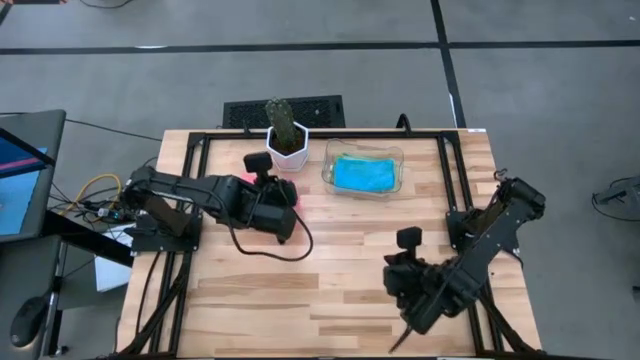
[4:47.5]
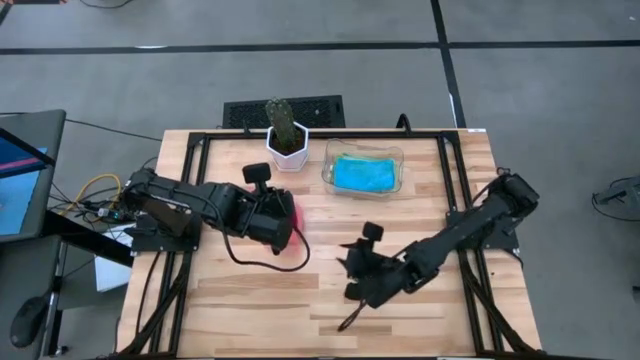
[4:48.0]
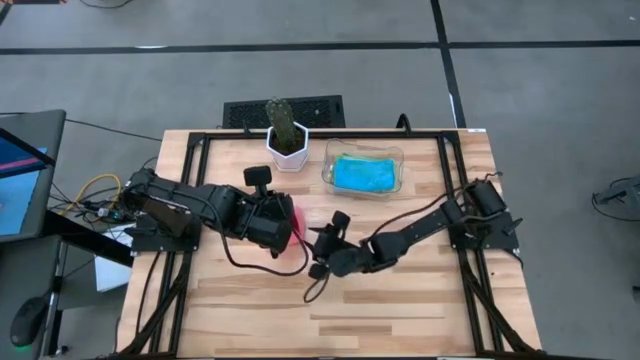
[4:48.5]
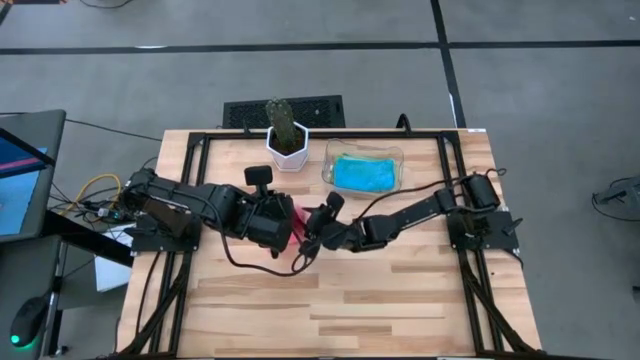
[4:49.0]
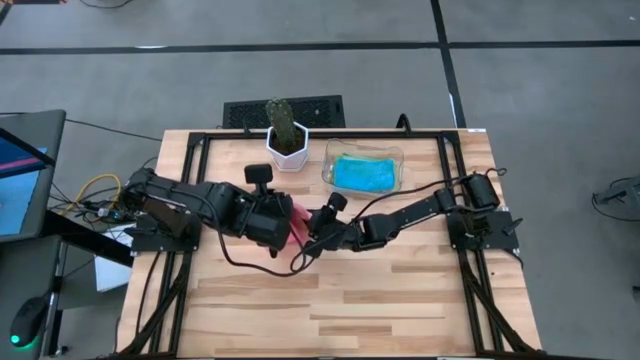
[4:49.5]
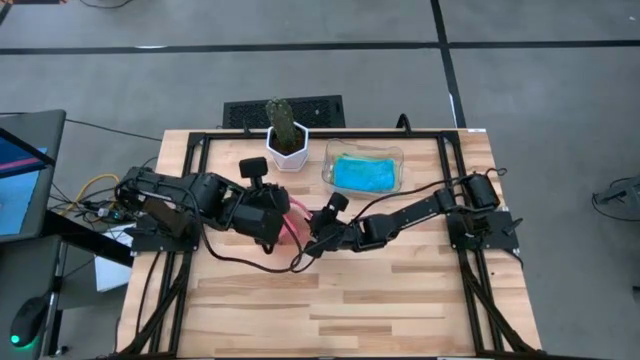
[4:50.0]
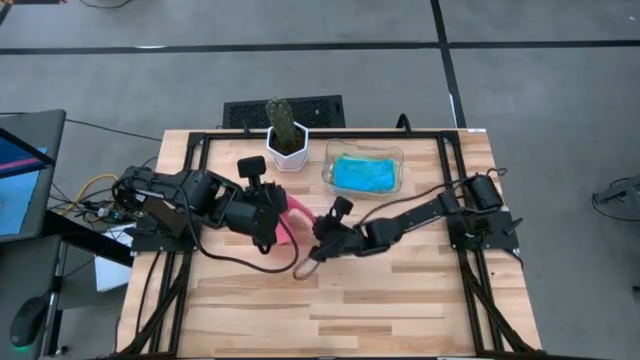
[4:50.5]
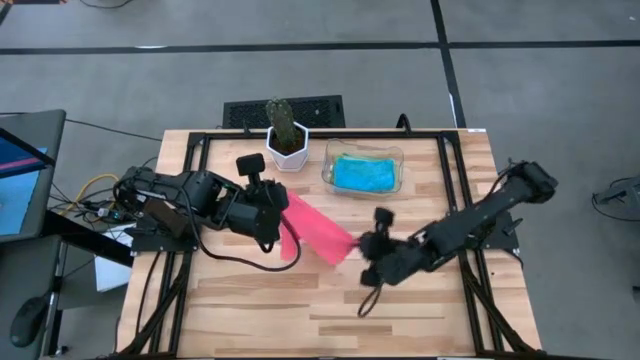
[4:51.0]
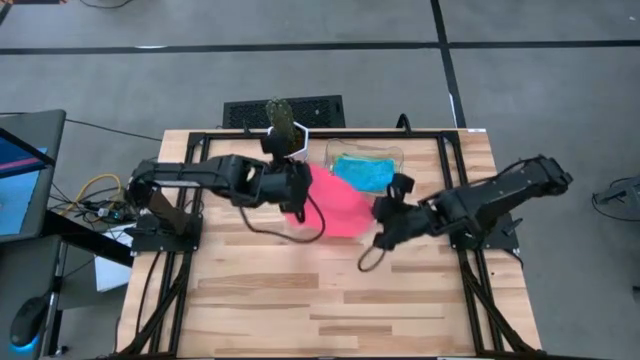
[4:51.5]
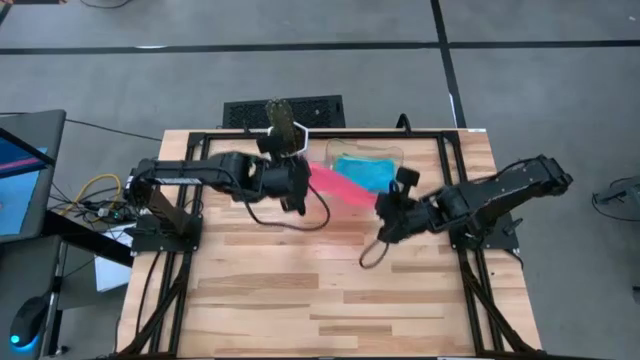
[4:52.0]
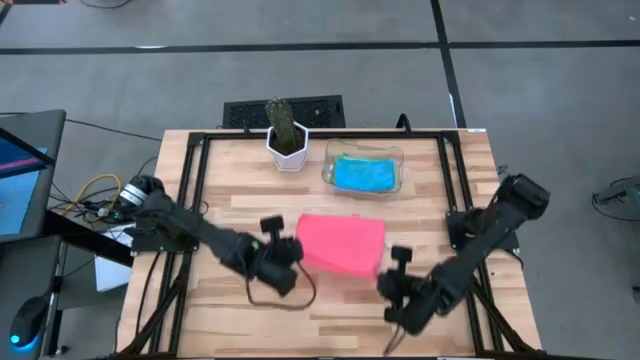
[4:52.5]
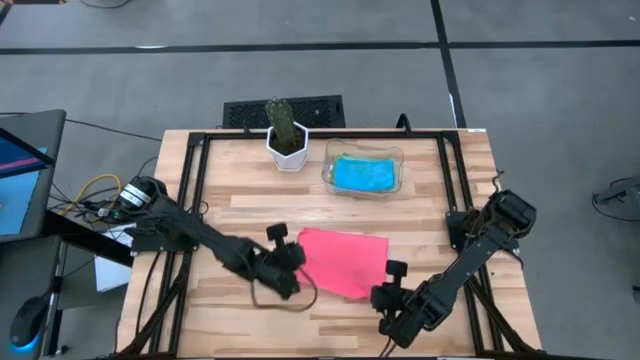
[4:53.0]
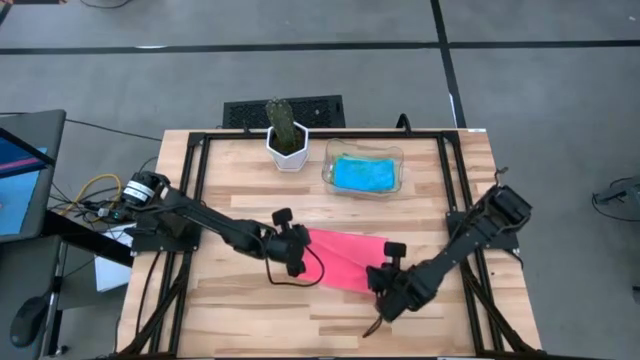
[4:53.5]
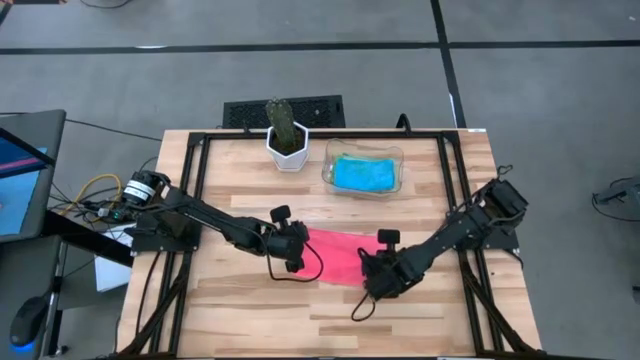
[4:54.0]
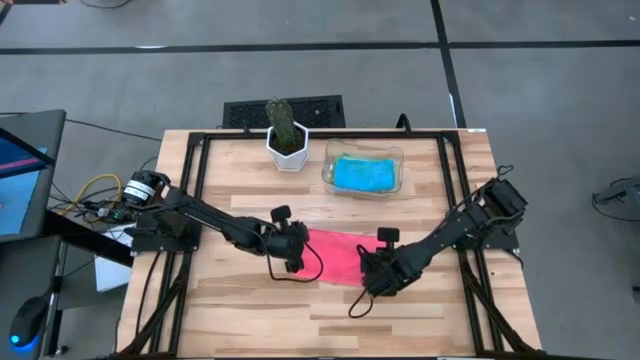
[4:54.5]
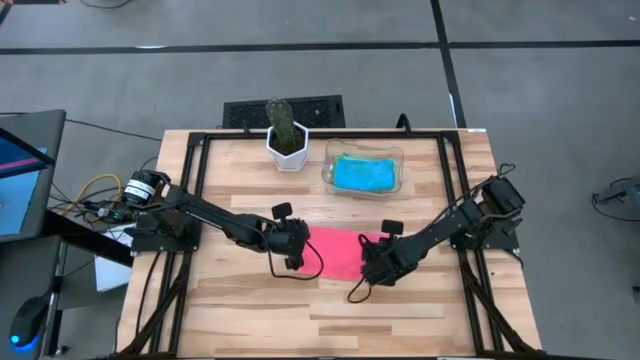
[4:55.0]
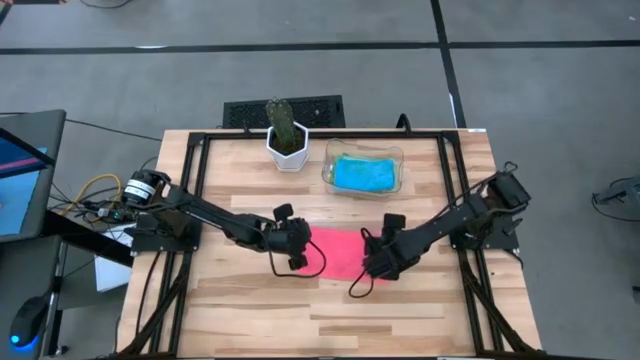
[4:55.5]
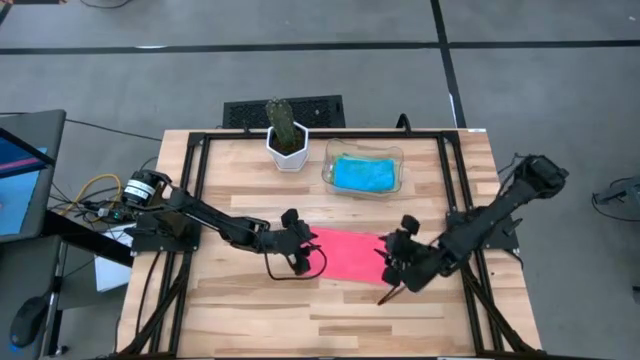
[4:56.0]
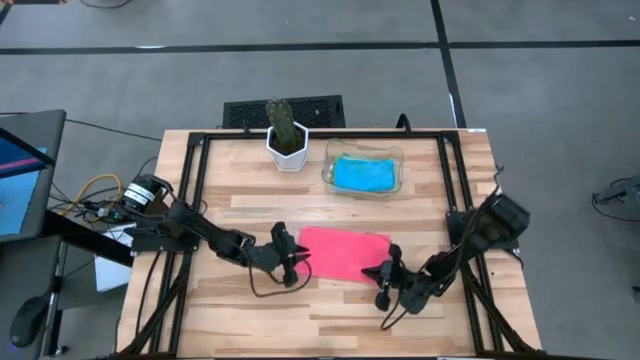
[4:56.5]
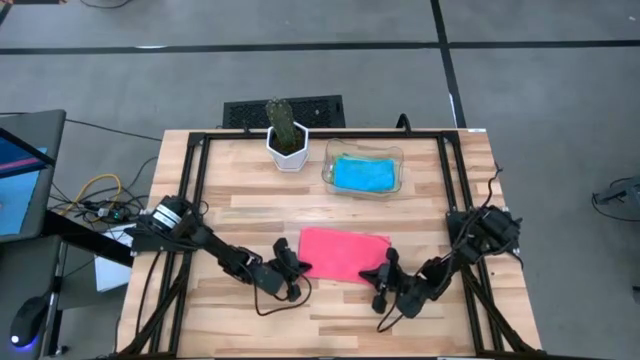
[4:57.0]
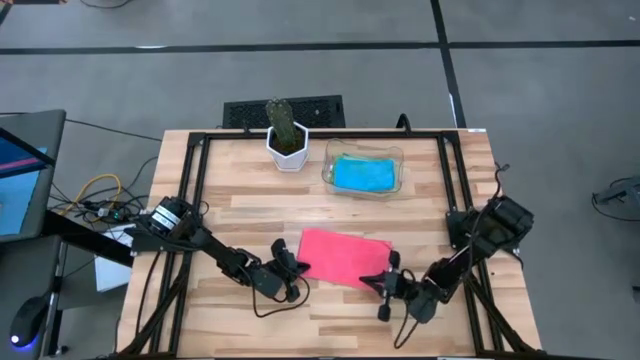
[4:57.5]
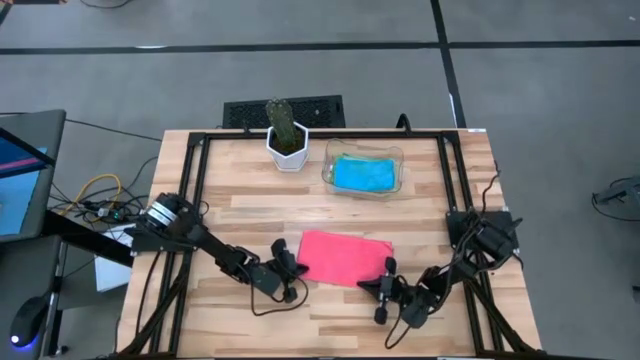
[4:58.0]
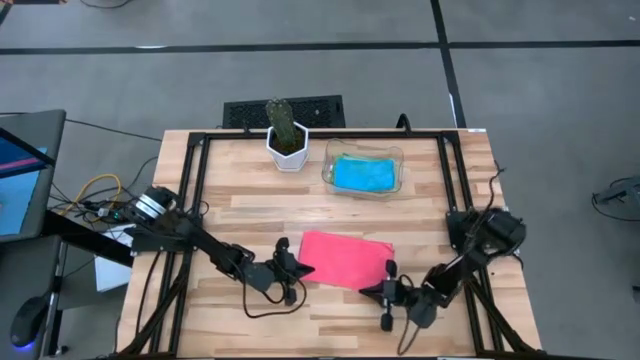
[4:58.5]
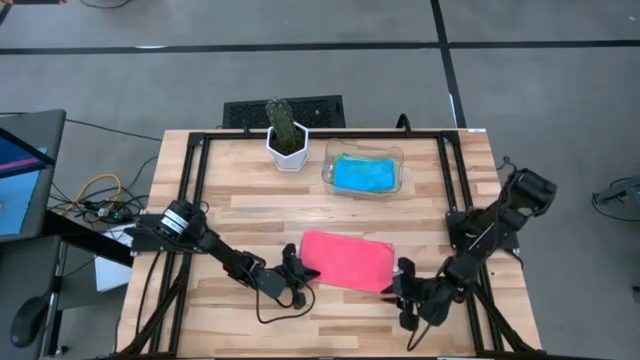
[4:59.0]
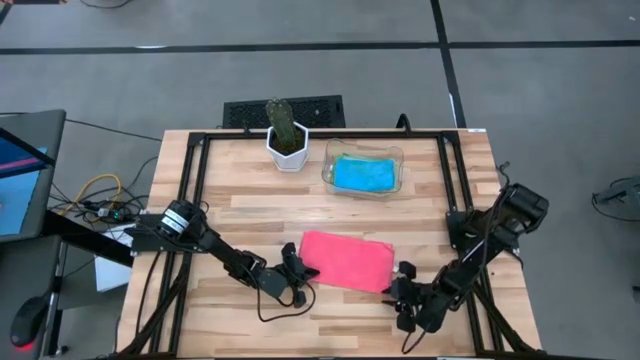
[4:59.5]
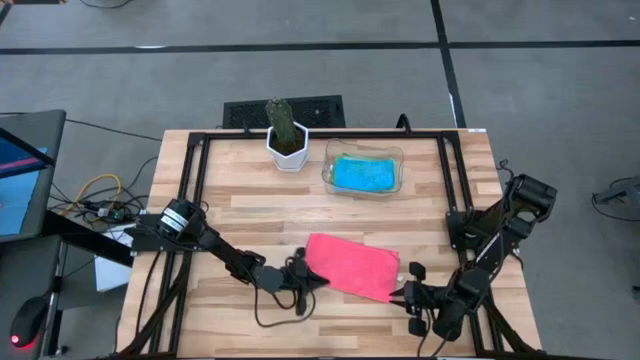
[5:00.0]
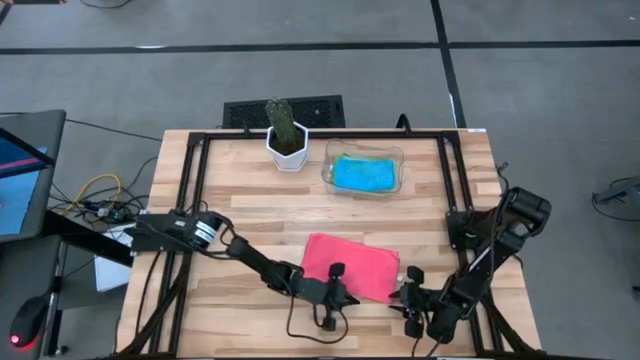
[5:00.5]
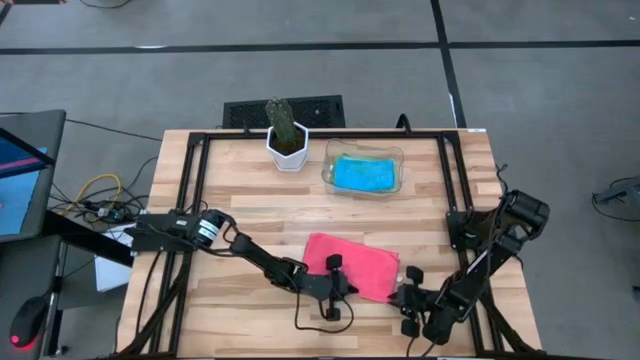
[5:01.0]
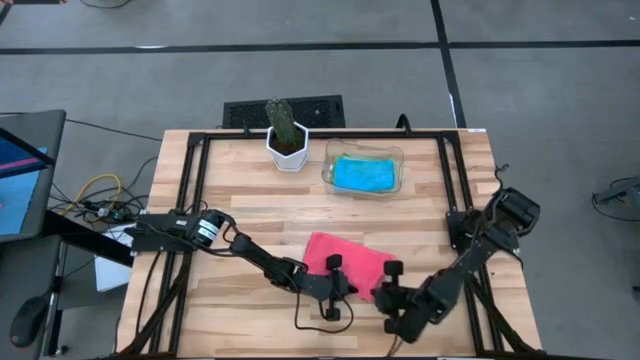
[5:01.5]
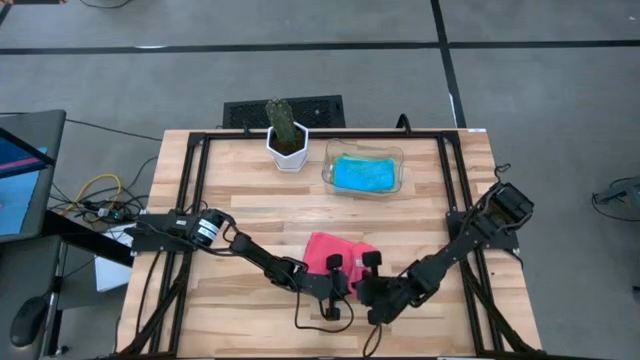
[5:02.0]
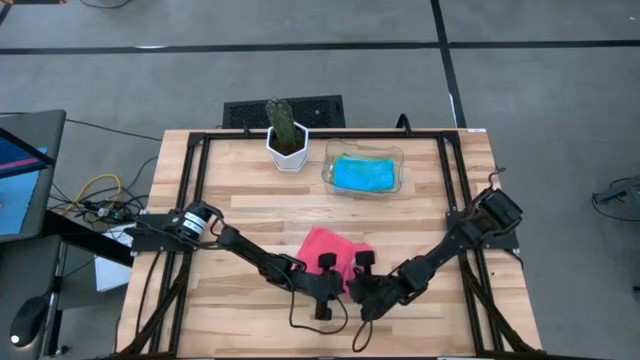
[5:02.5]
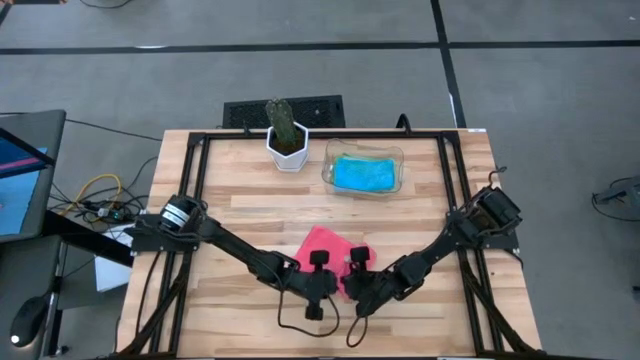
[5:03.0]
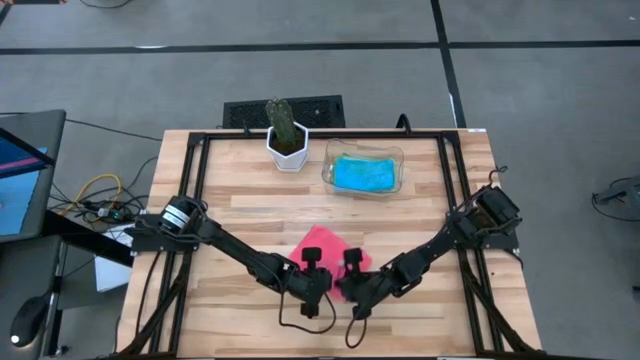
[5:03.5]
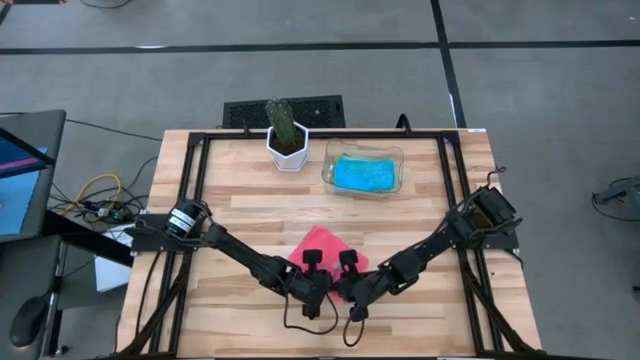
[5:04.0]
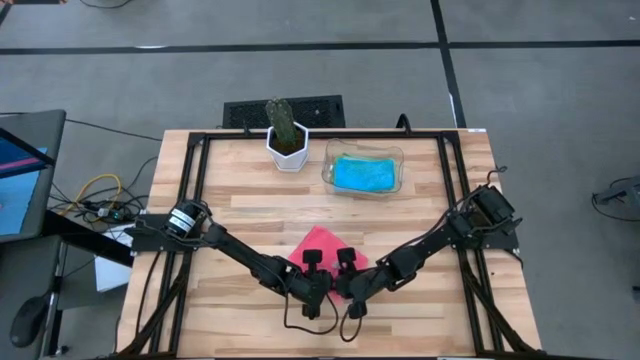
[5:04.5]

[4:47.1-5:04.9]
Task: Fold microfiber towels
Fold the pink towel

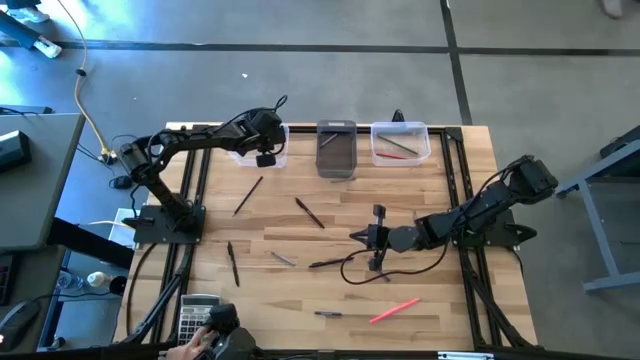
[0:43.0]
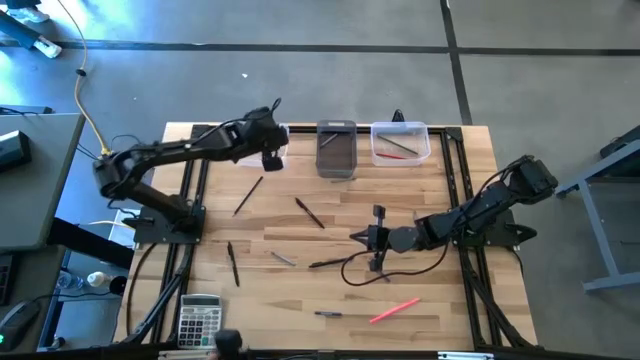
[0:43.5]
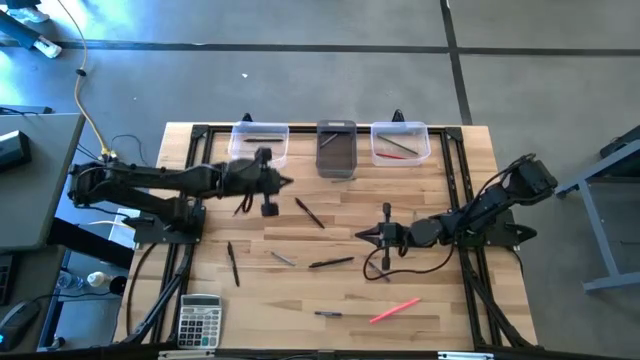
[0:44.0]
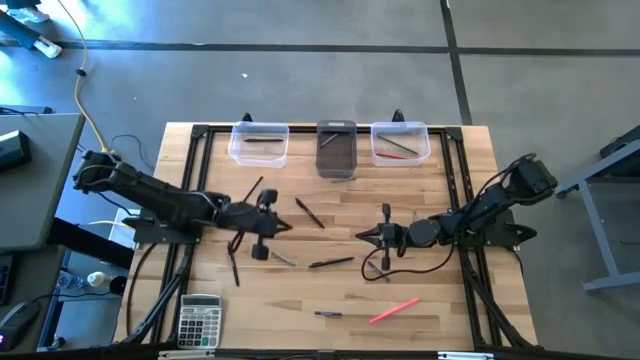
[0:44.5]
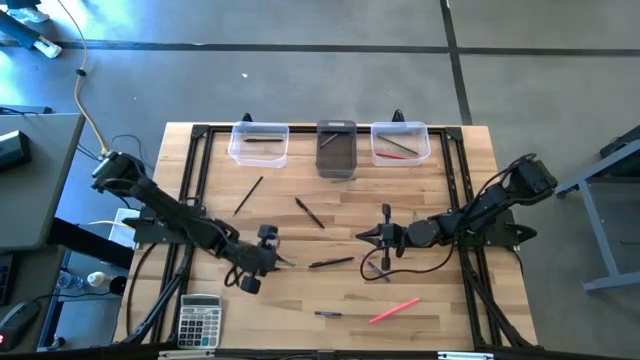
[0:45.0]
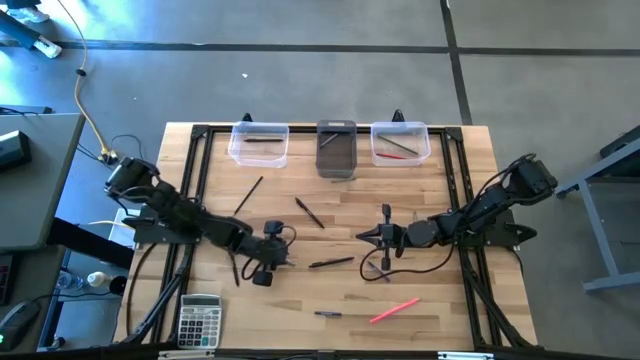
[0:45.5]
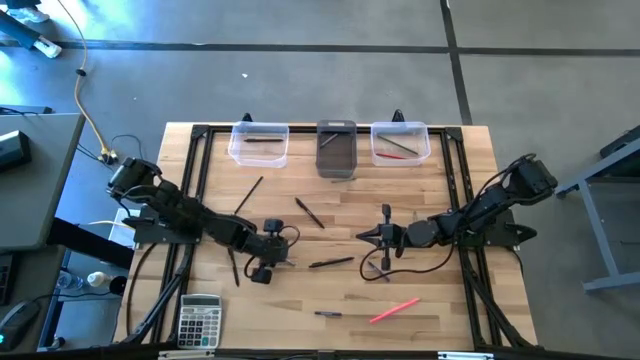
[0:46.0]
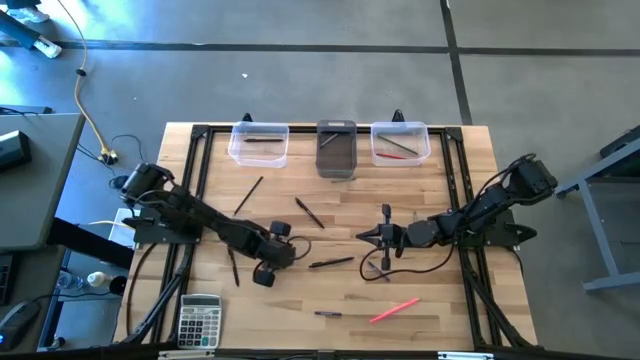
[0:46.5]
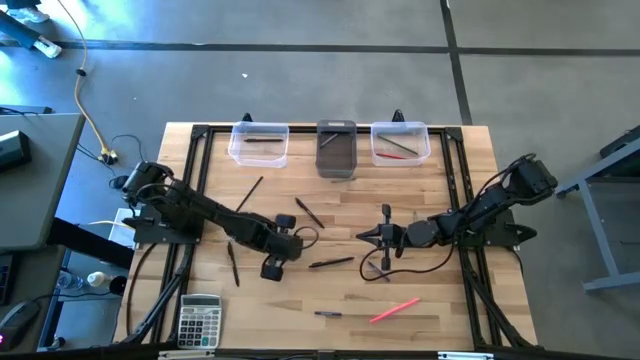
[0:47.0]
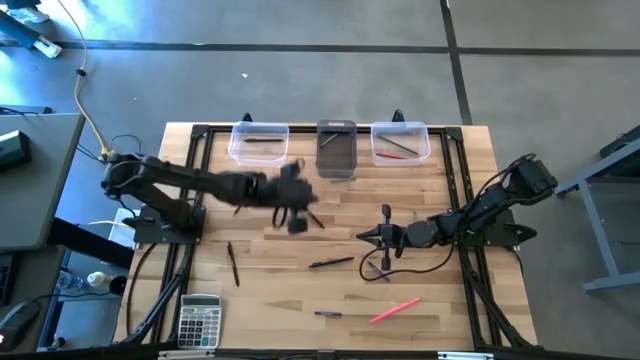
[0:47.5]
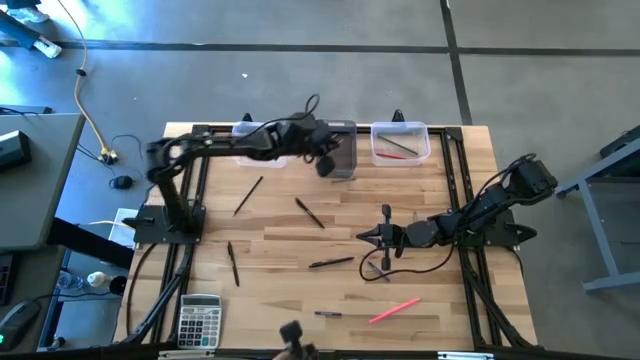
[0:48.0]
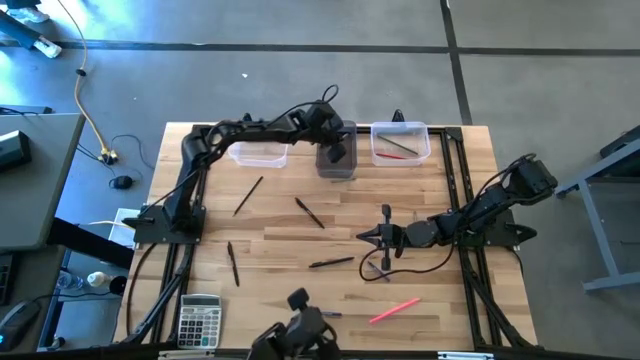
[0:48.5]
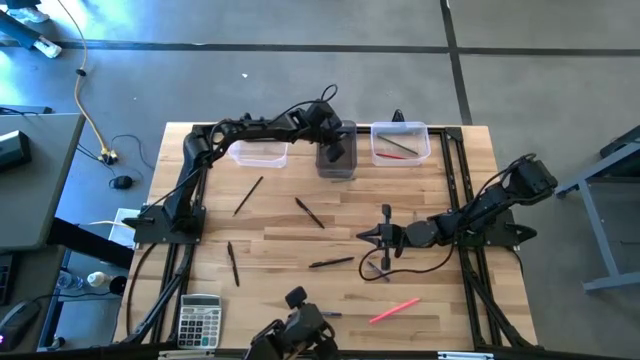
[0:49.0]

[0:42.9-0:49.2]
Task: Sort crayons/erasers/pens/pencils in bins
Put the gray crayon into the black bin
